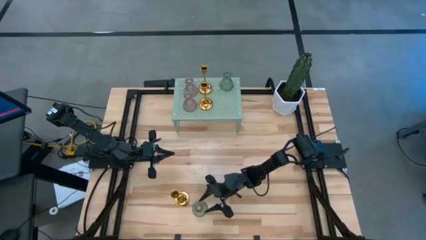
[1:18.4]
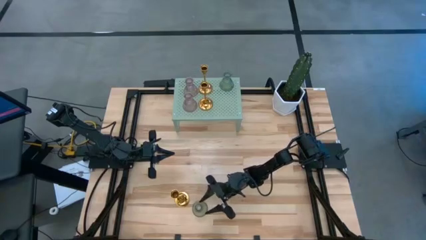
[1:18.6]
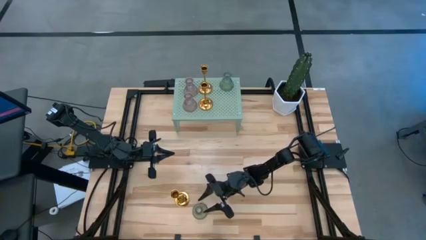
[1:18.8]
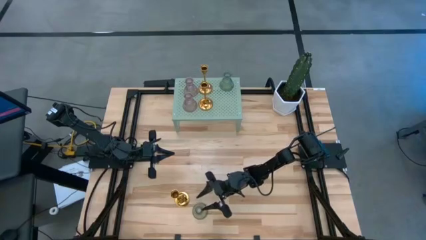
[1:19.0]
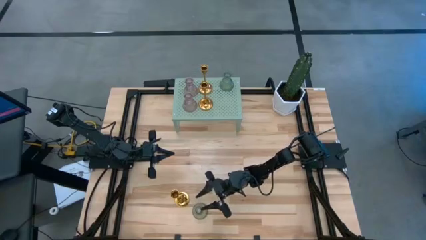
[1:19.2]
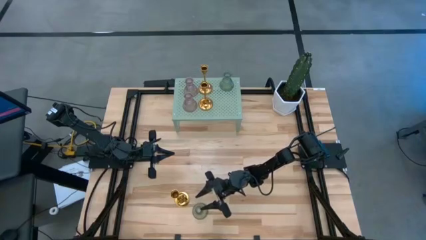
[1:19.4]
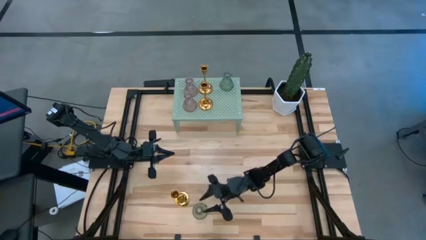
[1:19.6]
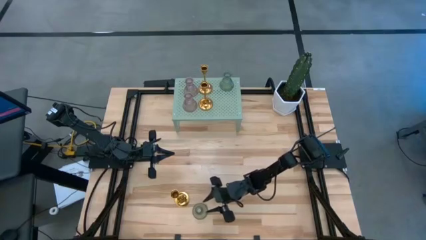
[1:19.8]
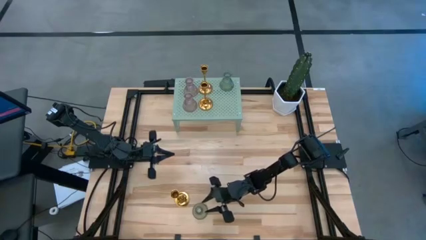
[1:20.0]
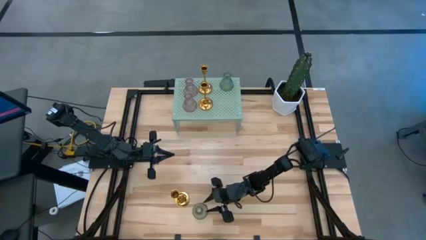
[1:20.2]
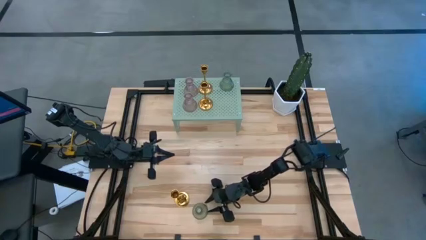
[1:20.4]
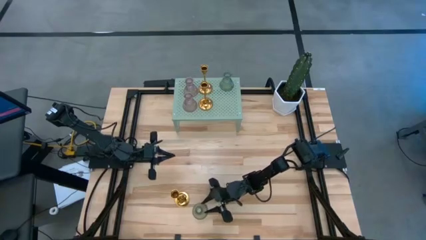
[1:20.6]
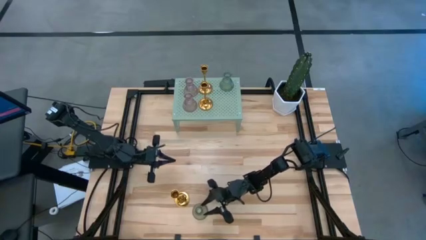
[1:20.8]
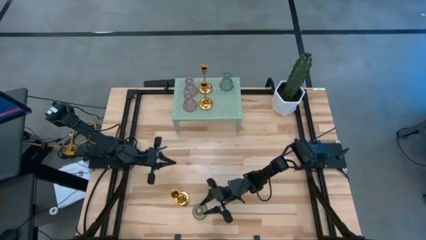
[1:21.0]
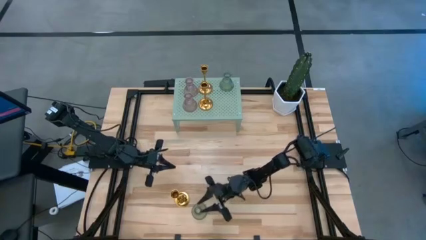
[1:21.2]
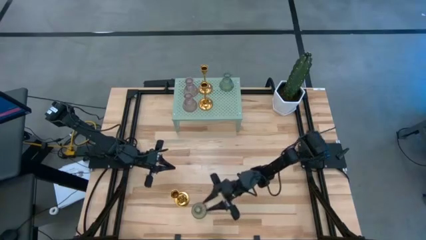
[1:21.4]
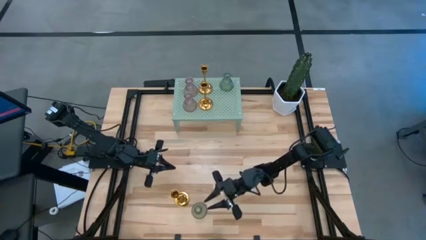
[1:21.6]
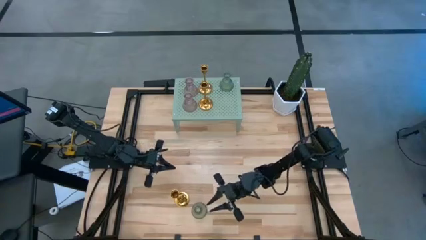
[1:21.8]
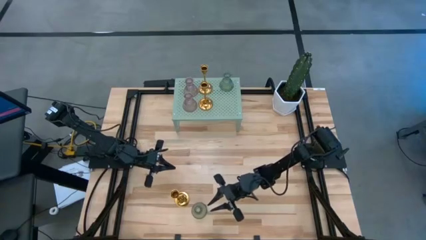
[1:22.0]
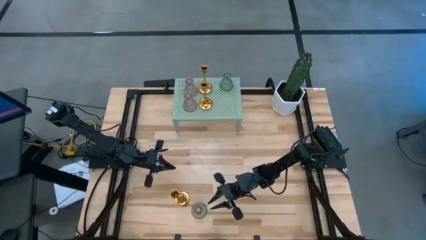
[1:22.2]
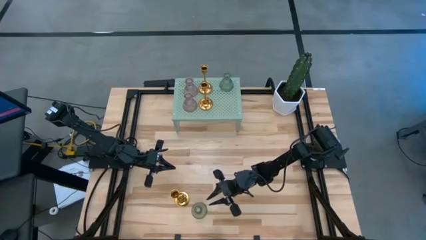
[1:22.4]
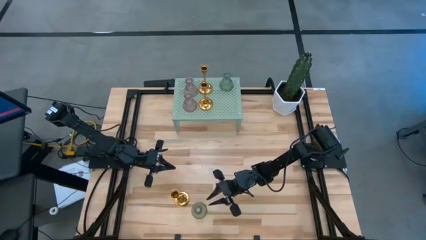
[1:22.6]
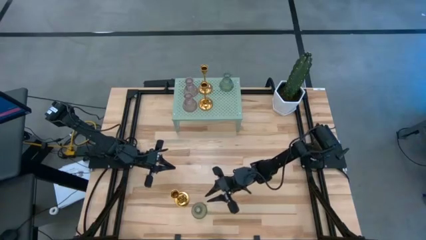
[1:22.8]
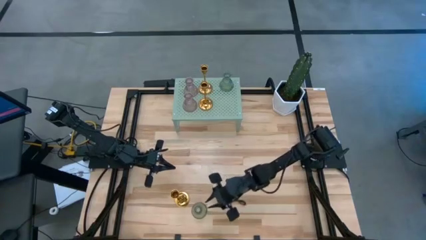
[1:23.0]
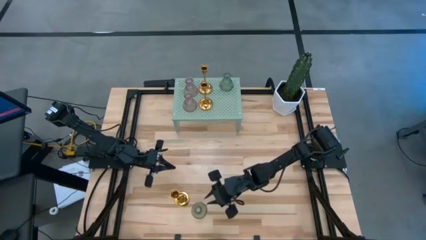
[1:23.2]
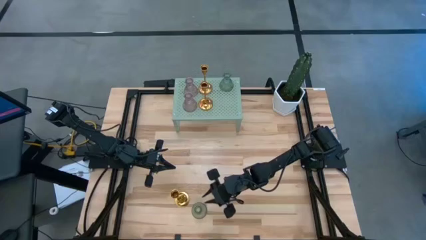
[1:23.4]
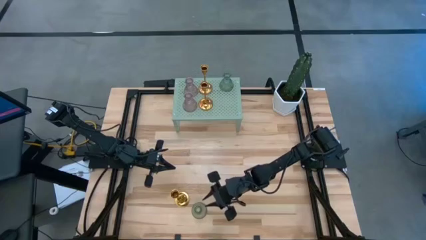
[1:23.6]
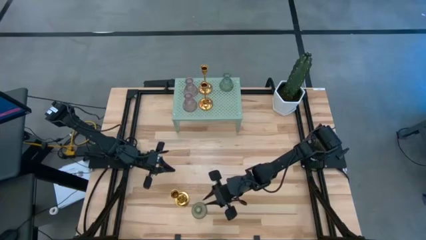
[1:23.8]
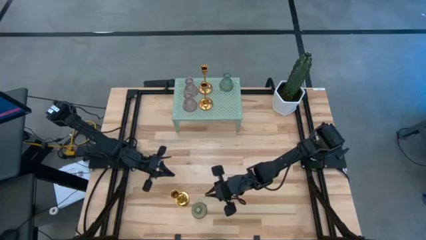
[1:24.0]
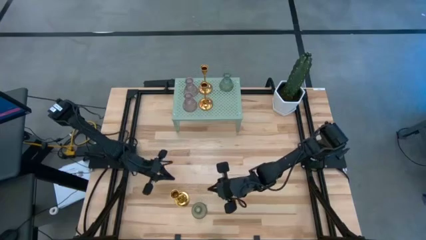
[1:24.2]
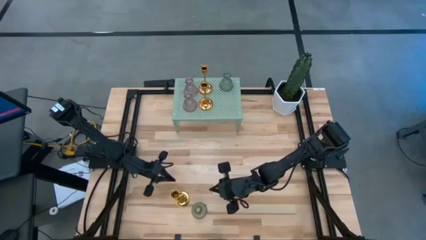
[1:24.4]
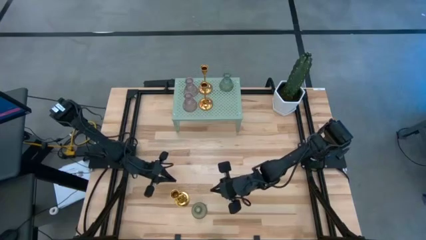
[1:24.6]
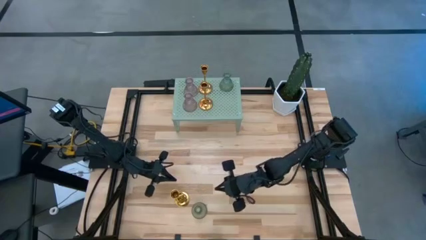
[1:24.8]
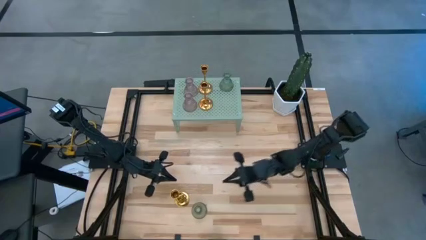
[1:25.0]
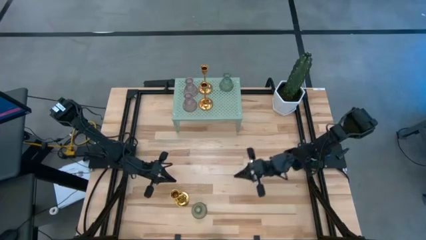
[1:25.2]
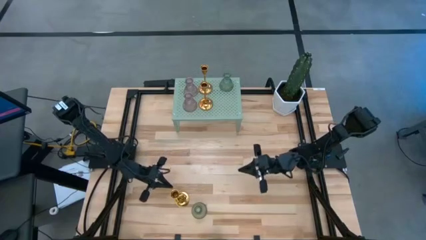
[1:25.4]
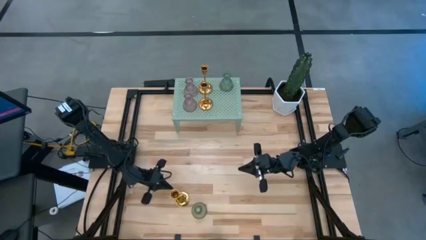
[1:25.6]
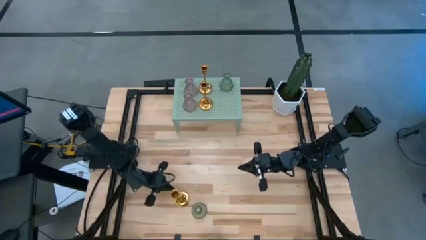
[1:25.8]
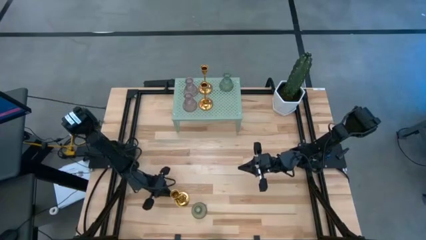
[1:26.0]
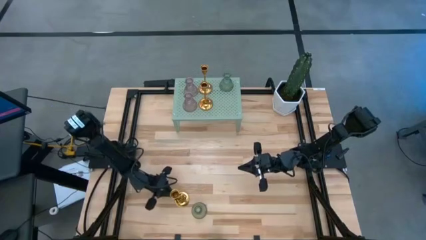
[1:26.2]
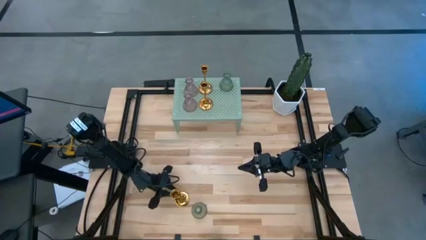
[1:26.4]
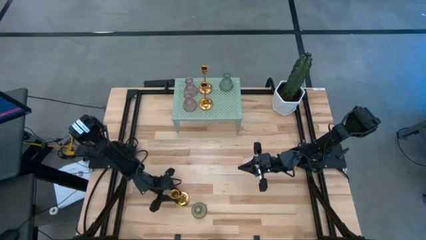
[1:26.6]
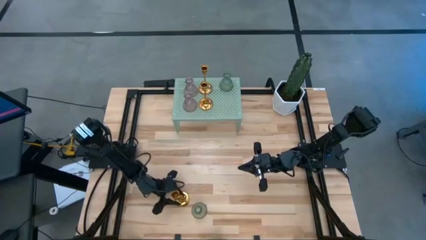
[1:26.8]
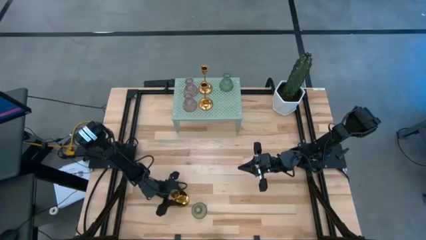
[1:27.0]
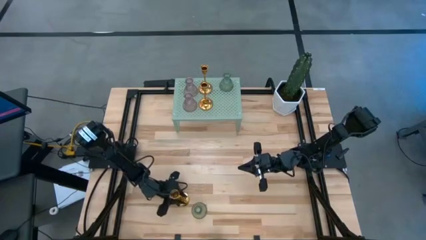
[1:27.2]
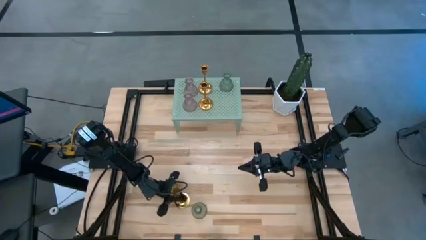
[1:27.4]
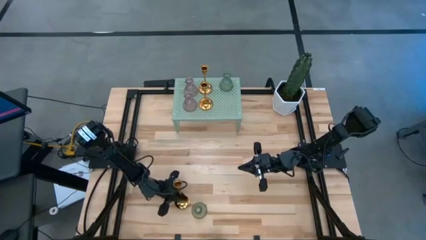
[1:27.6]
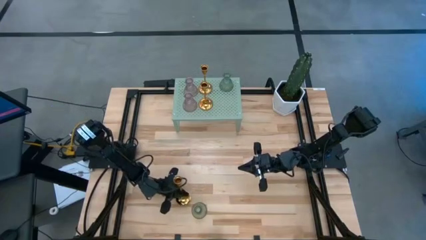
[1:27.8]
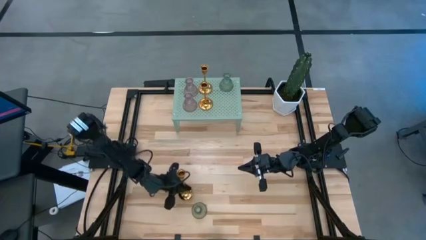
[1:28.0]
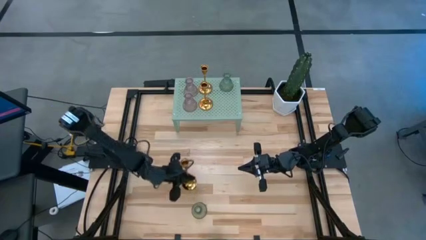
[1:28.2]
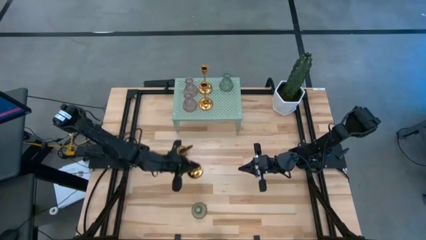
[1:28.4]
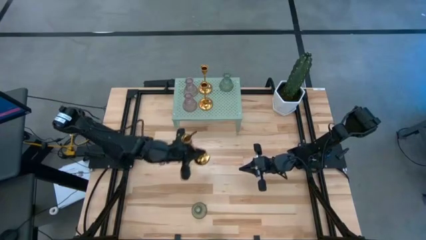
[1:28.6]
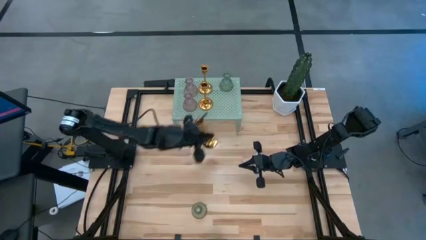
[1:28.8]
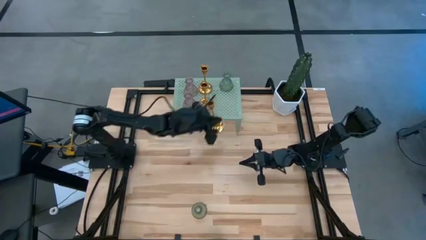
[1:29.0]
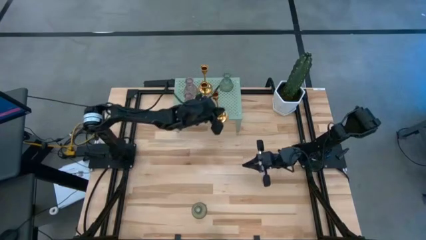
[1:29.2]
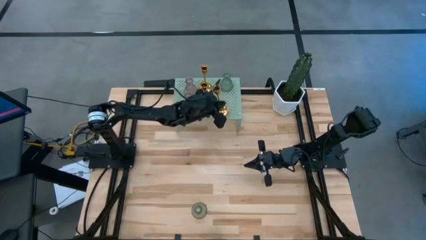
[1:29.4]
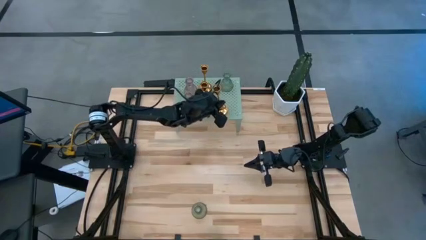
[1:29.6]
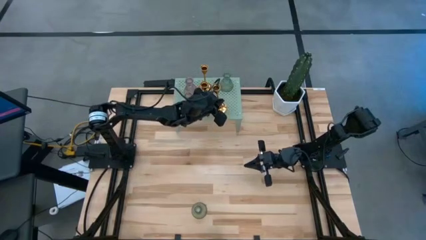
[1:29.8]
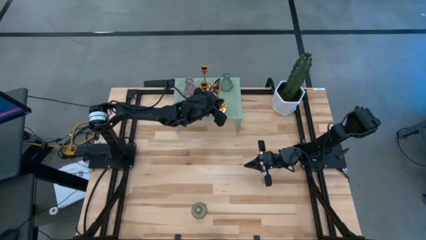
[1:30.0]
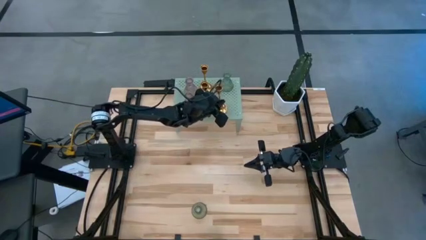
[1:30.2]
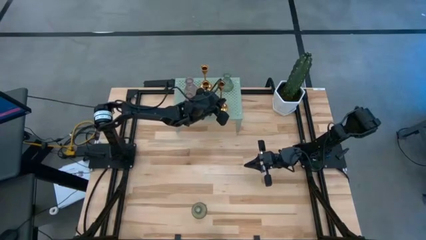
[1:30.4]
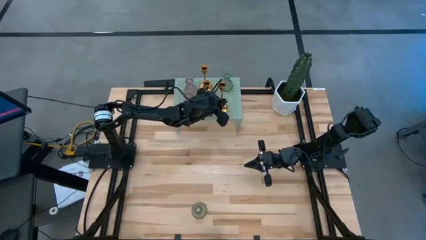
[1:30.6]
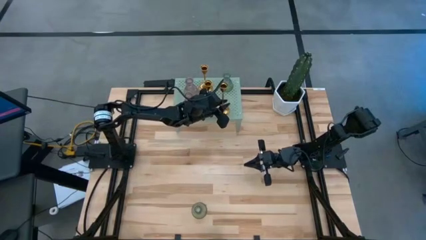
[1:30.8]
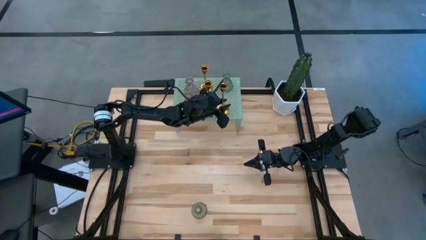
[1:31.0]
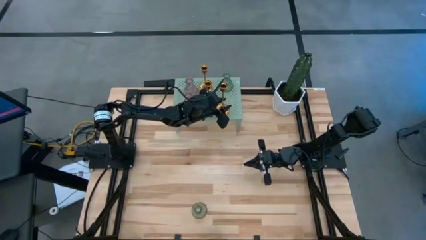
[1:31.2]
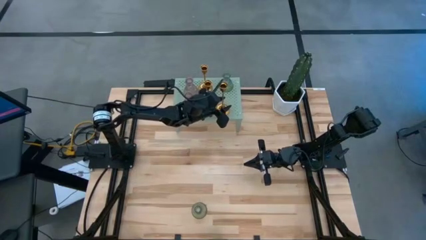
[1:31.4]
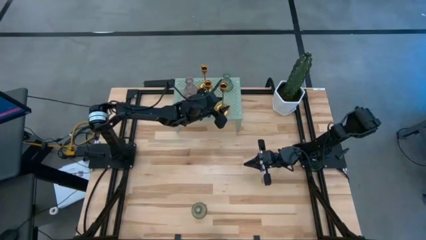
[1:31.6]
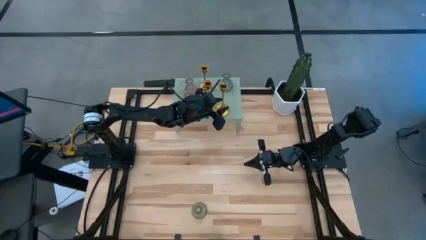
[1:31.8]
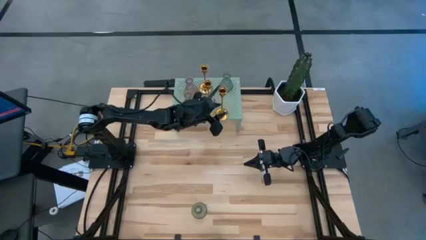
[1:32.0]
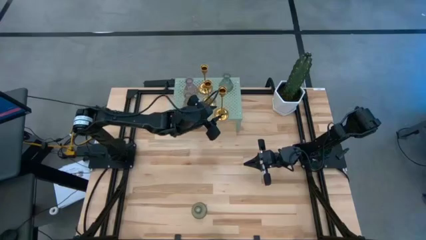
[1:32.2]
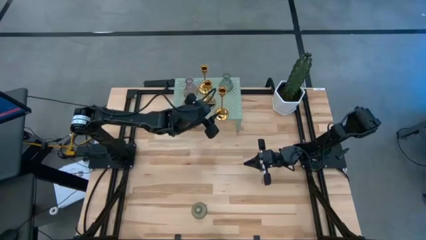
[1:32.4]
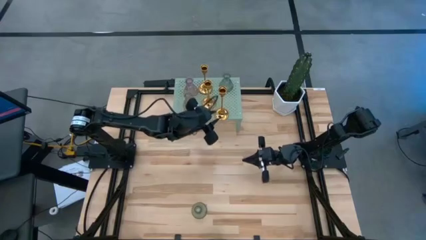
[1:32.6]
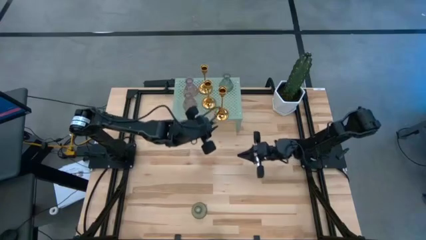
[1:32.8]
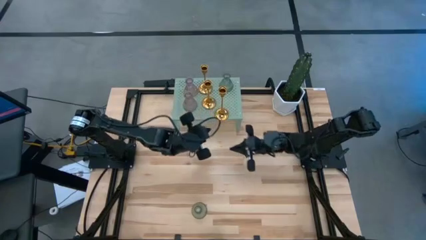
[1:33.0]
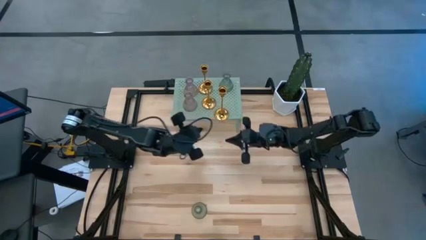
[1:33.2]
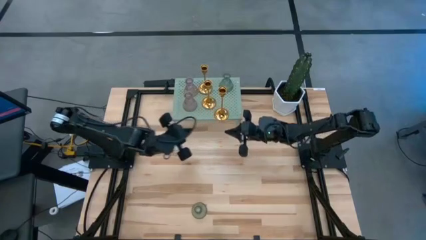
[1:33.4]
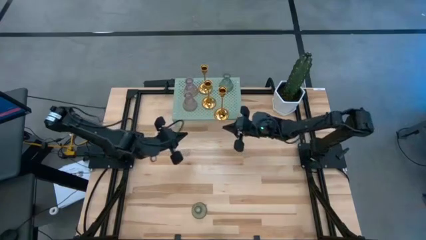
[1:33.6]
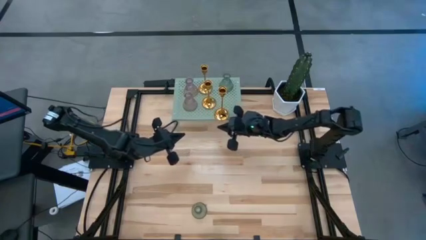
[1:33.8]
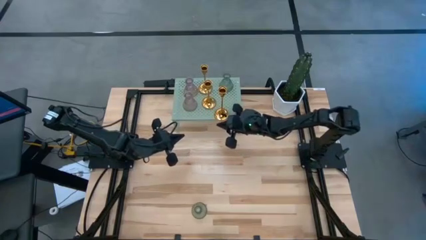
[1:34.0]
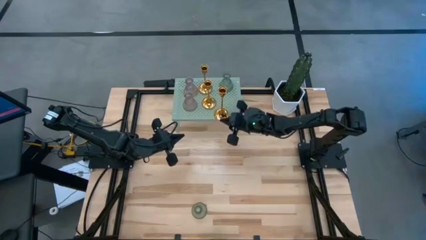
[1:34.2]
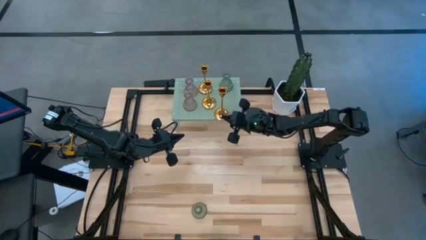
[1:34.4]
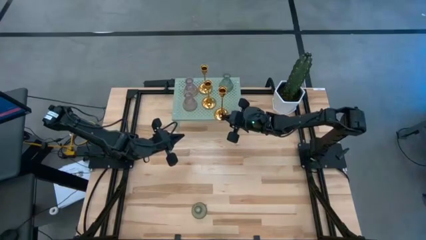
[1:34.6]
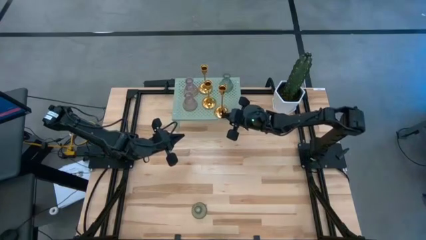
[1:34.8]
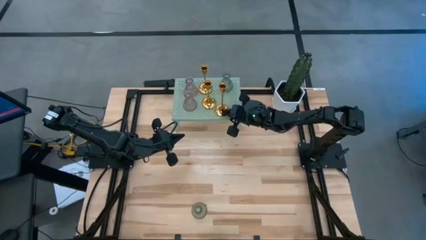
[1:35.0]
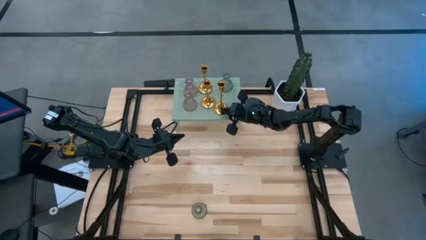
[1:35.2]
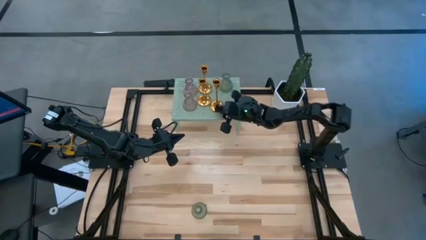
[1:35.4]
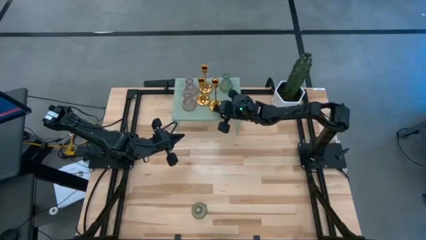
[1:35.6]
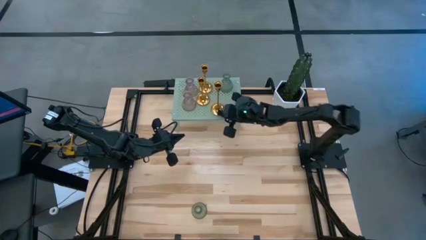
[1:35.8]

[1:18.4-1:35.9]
Task: Pick & Place candle stick holders
Put the gold candle holder on the shelf
